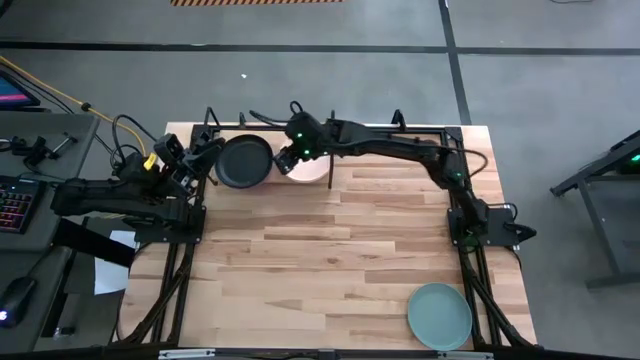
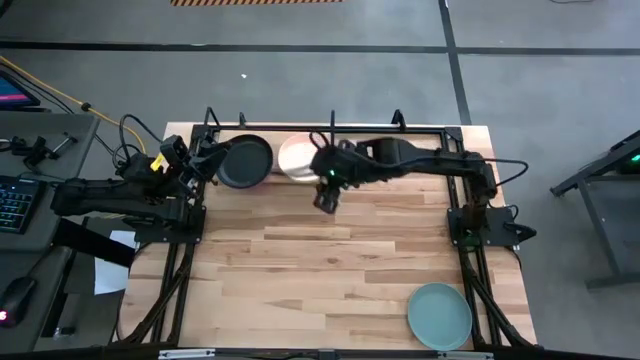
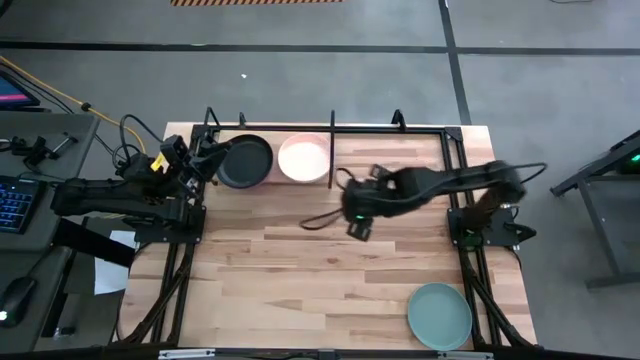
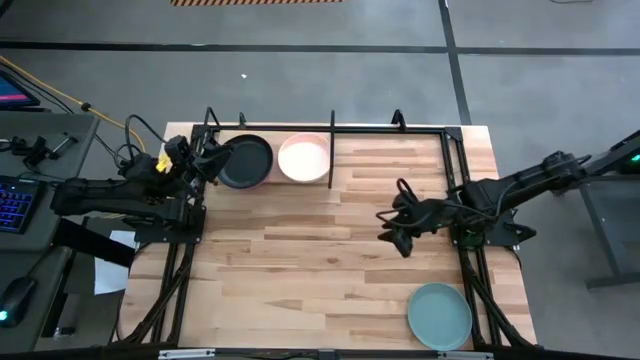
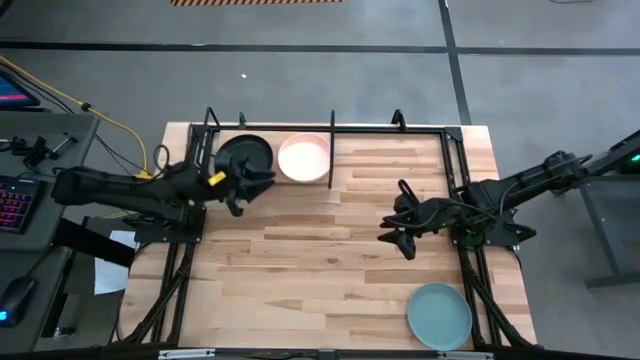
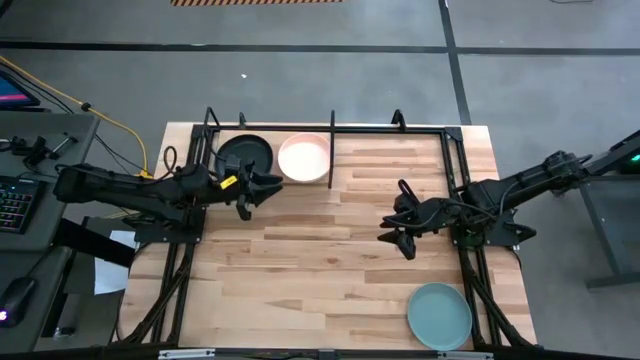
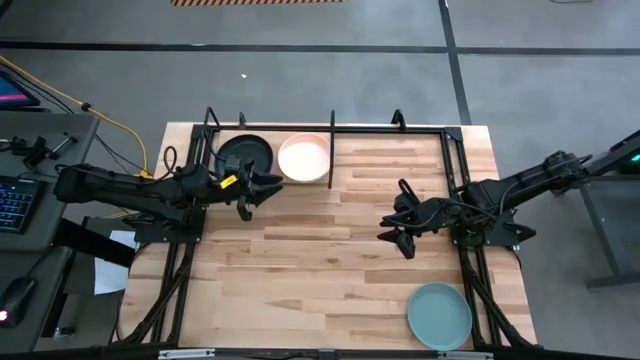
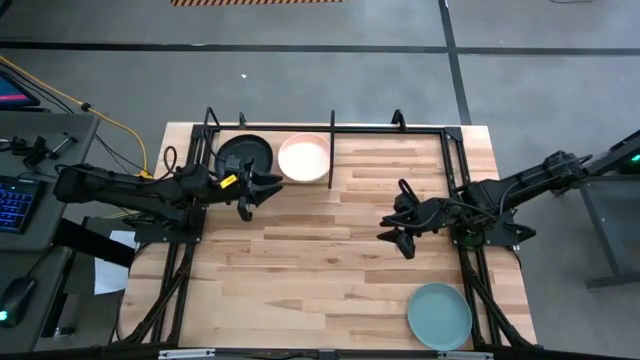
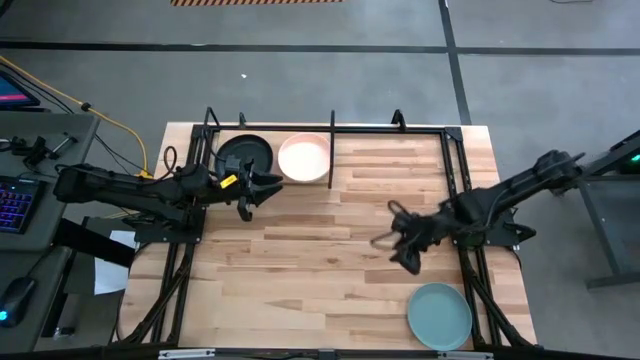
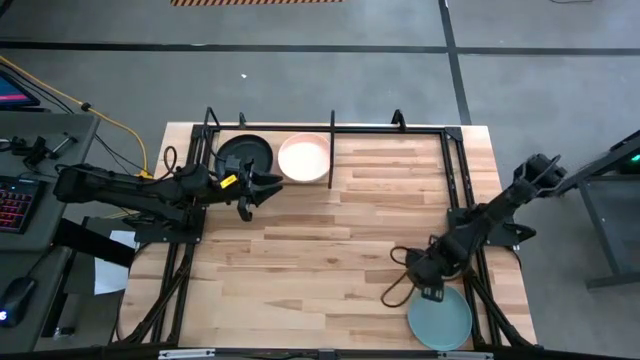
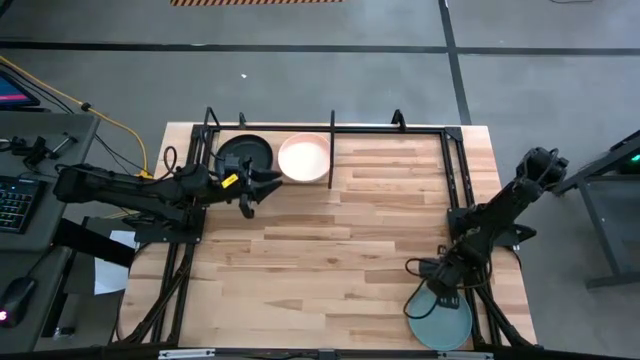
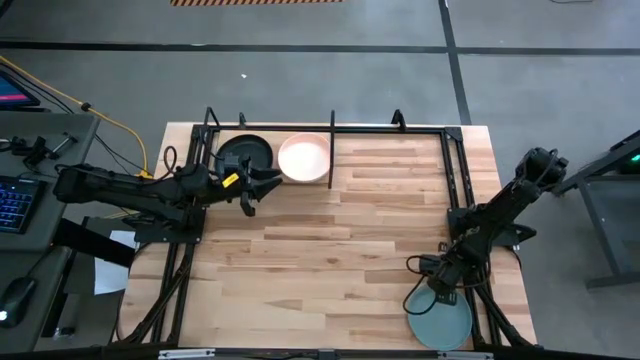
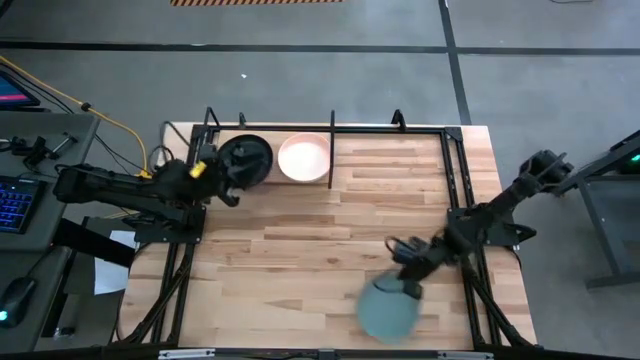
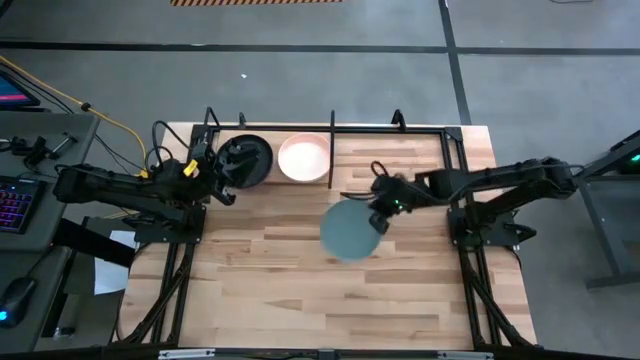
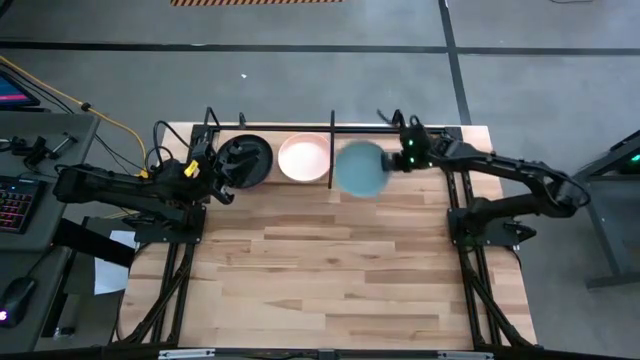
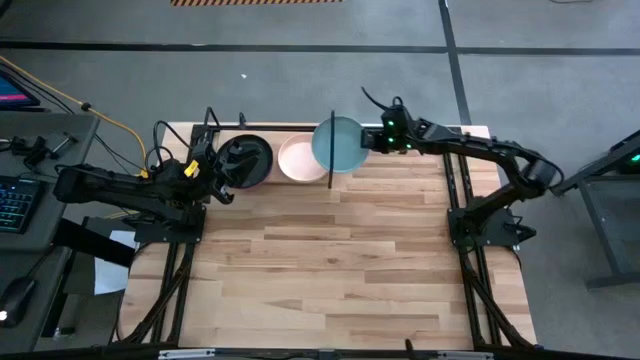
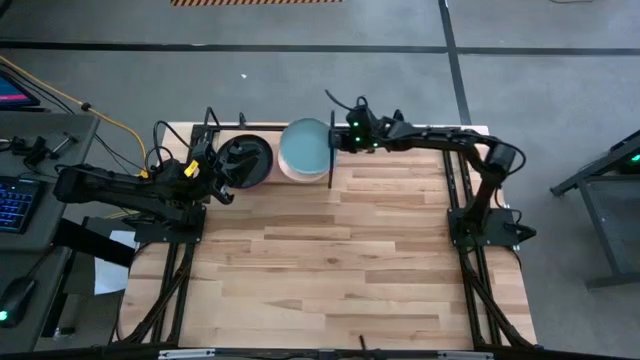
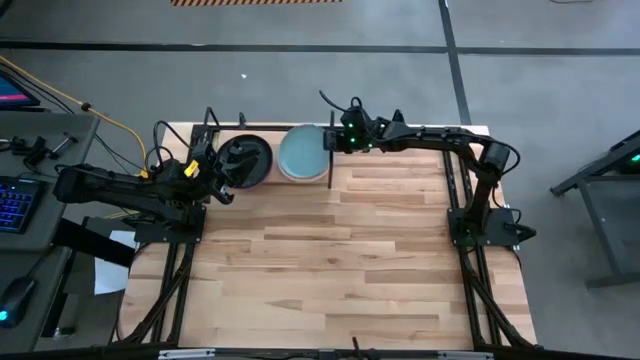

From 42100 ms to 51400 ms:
Task: Place and stack plates onto a shelf
Stack the light blue plate on top of the light orange plate on the shelf

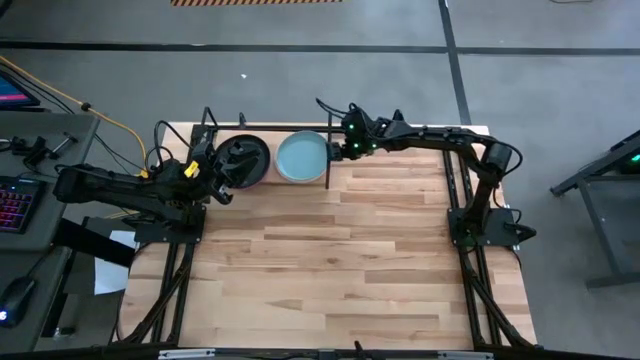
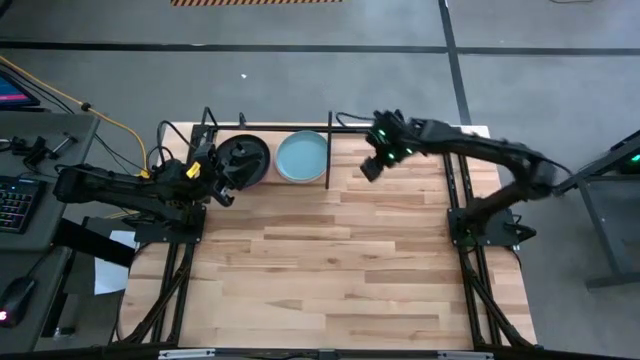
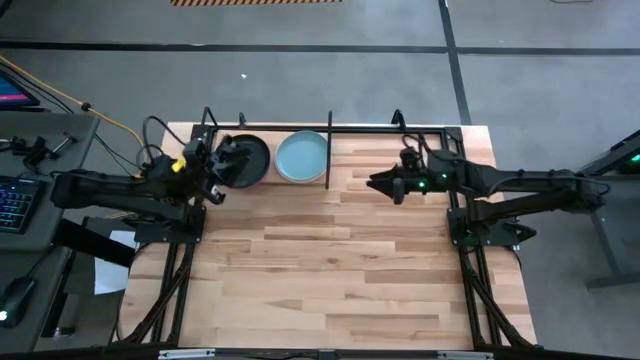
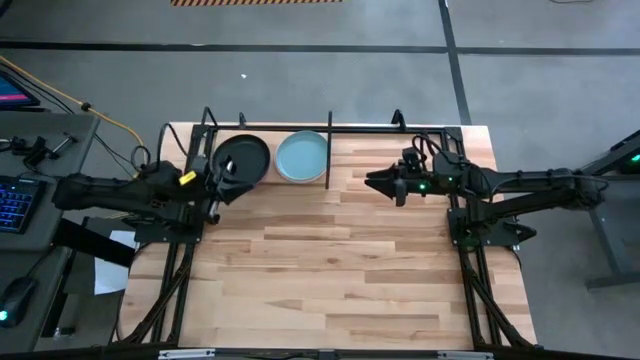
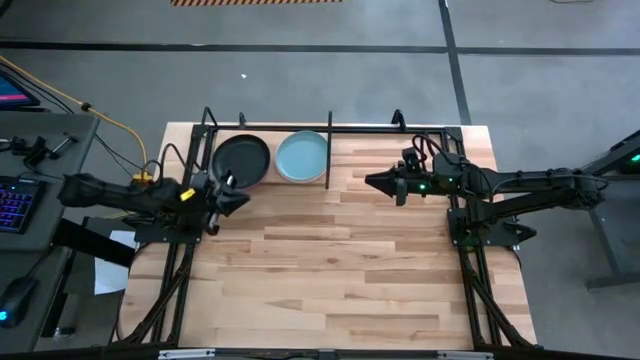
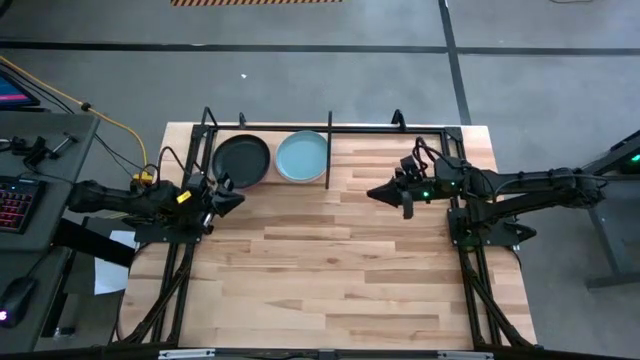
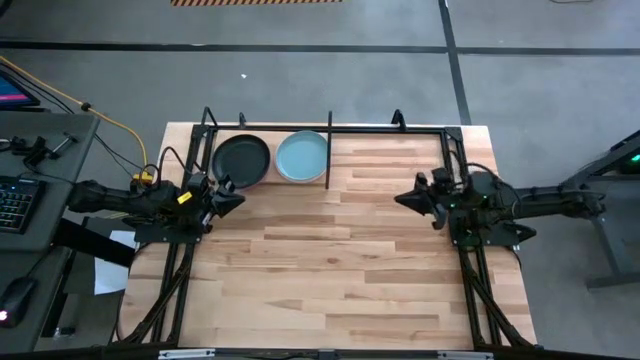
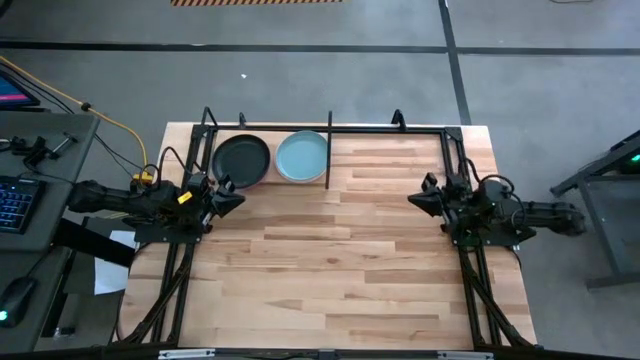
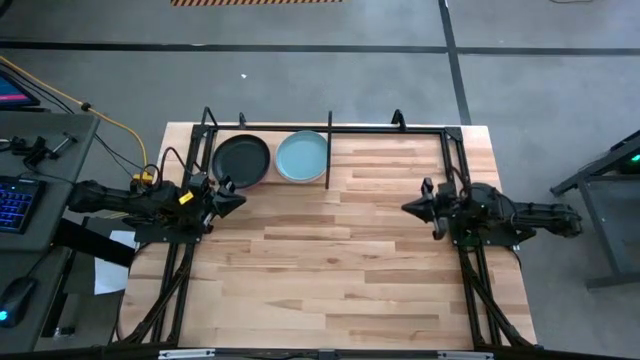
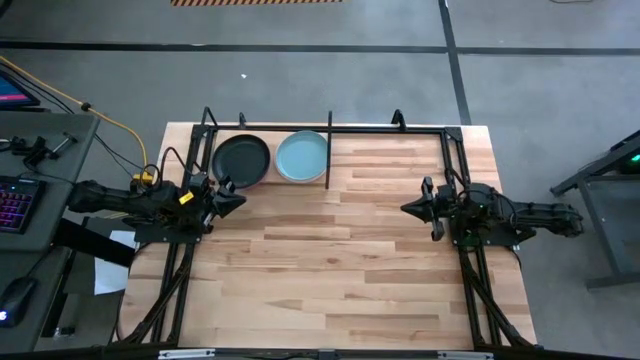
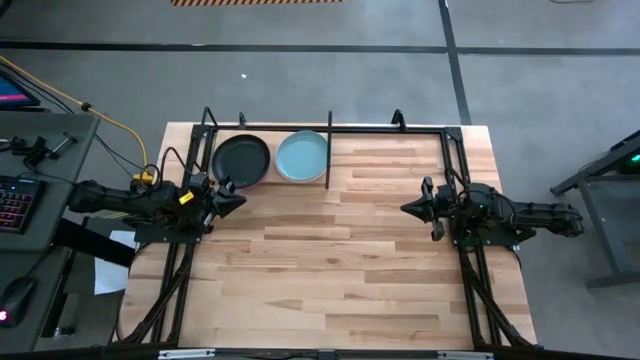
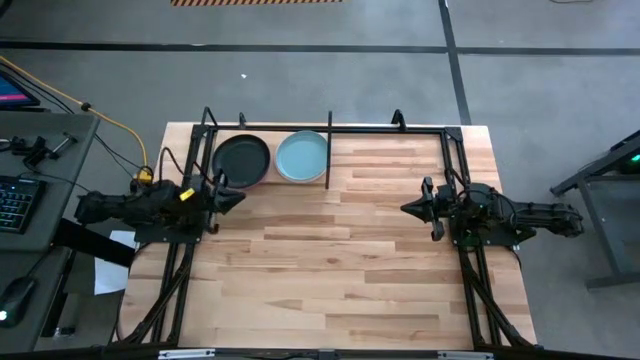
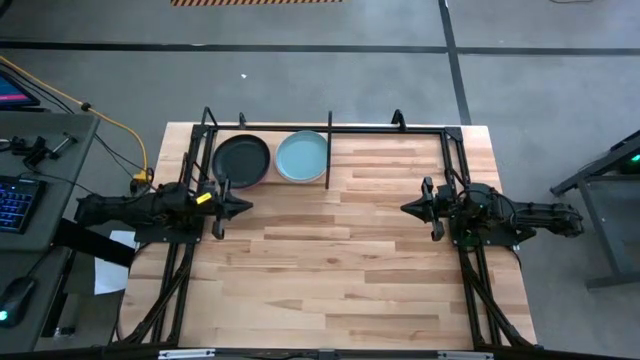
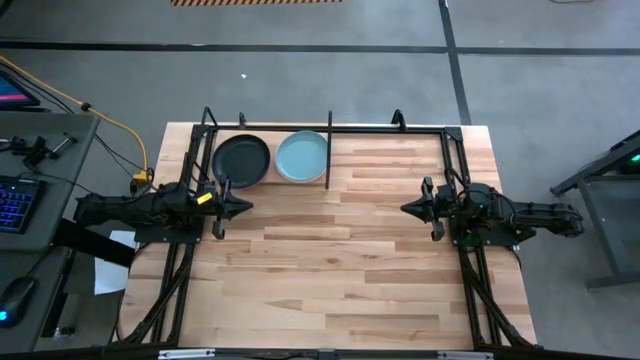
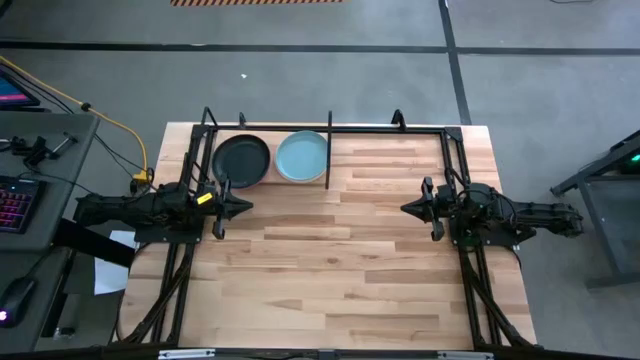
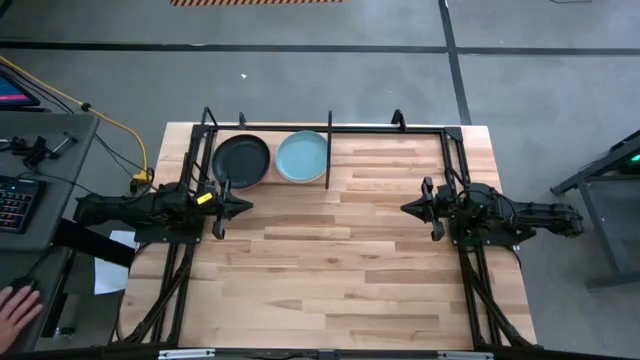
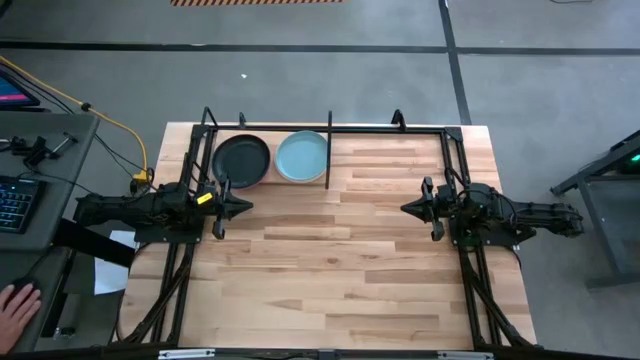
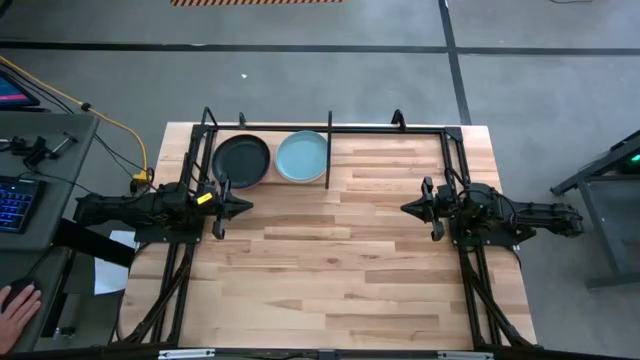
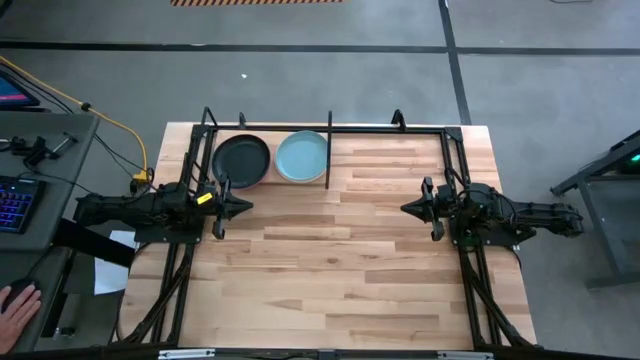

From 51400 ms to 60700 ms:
Return to Home Position

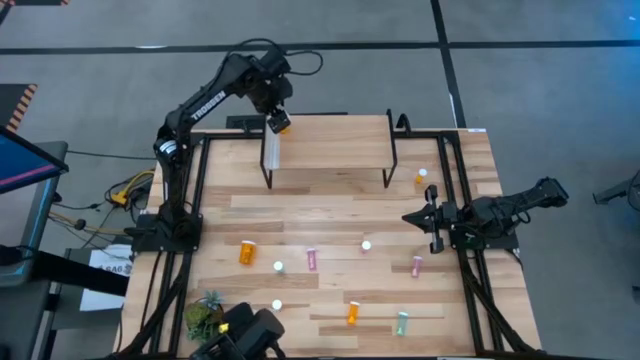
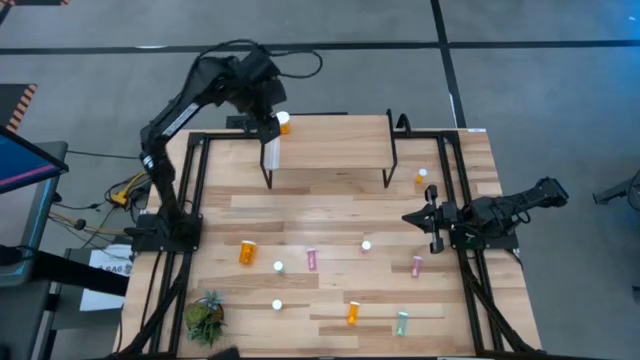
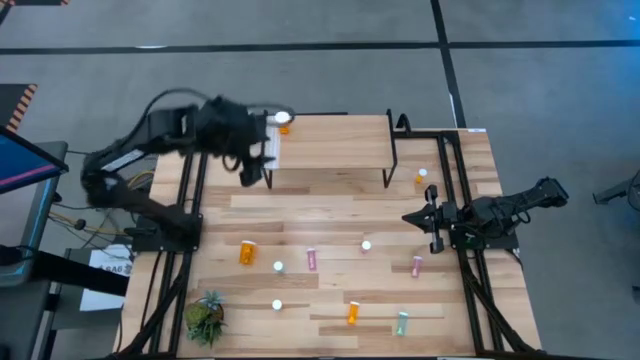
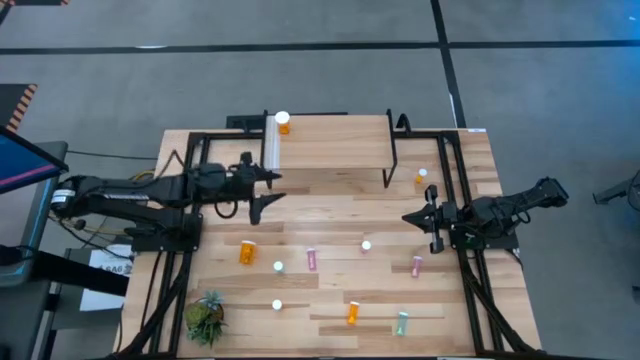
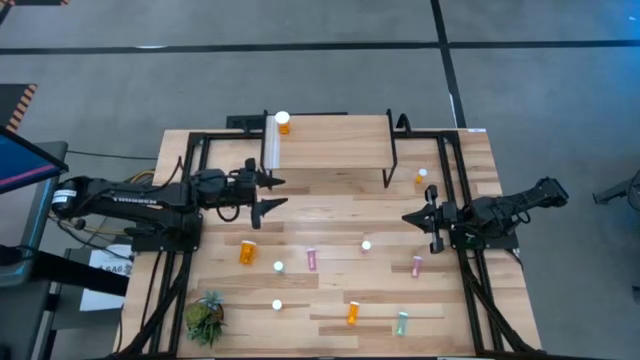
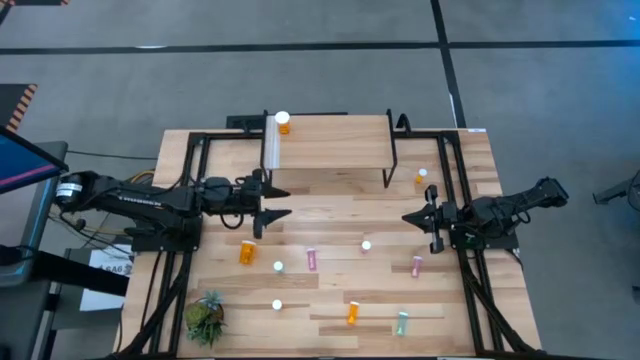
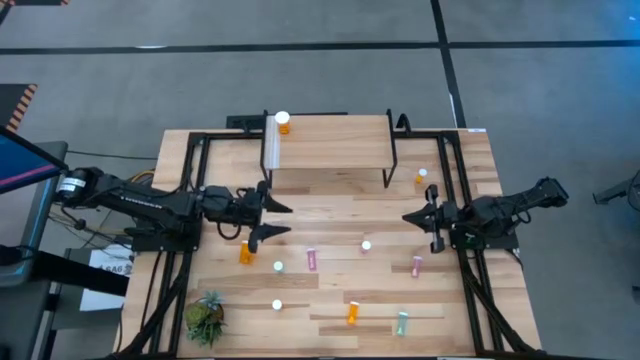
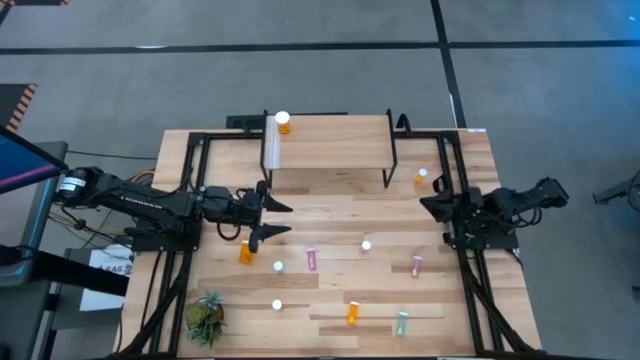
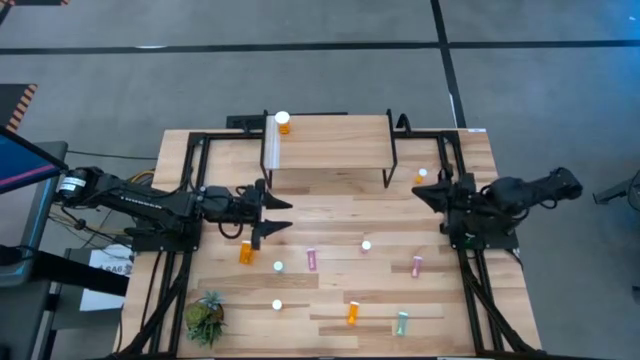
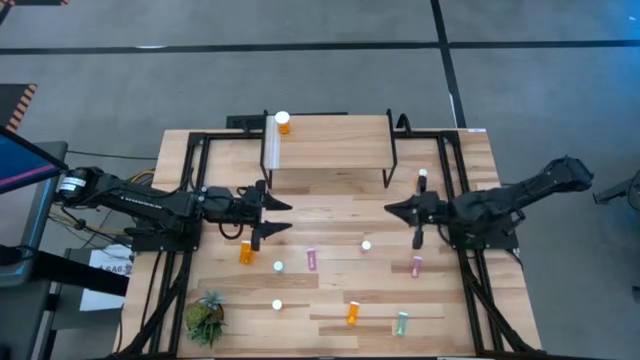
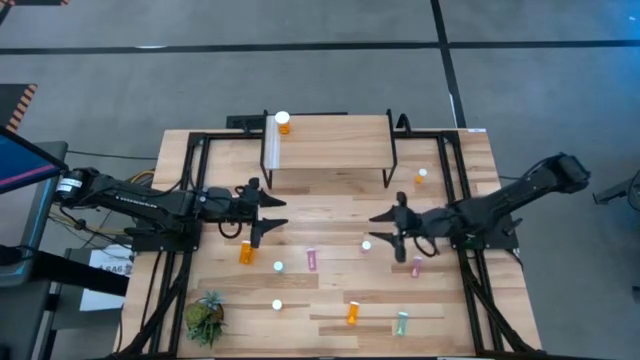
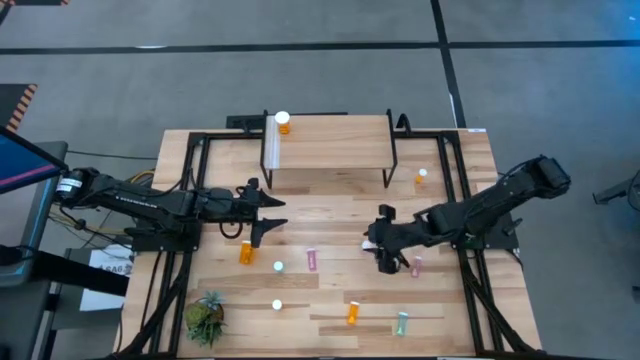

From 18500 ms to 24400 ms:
Task: Pick and place medicine bottles onto shelf by color
Put the middle pink pill bottle on the shelf
